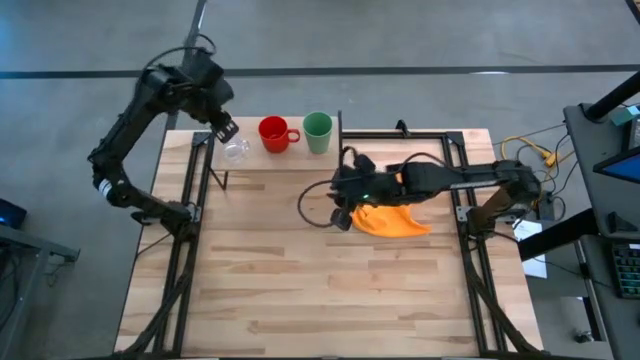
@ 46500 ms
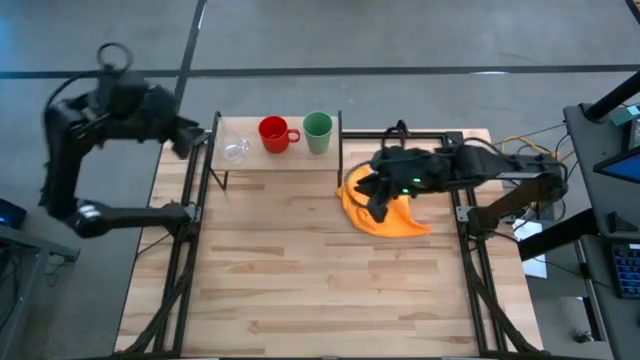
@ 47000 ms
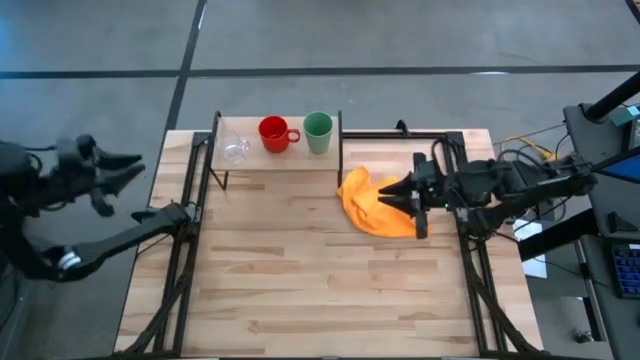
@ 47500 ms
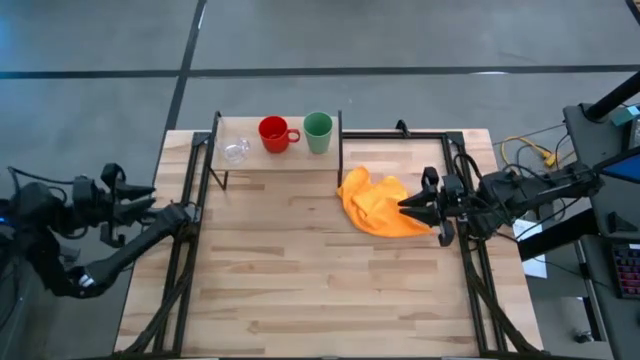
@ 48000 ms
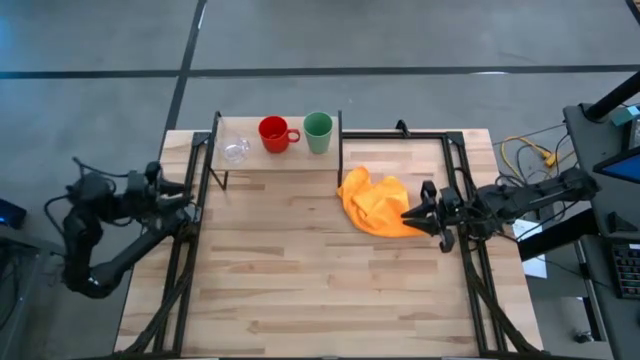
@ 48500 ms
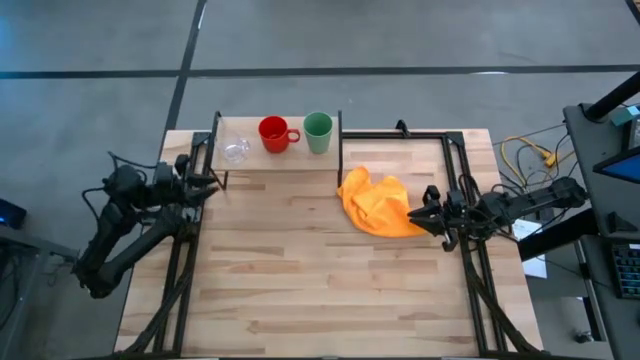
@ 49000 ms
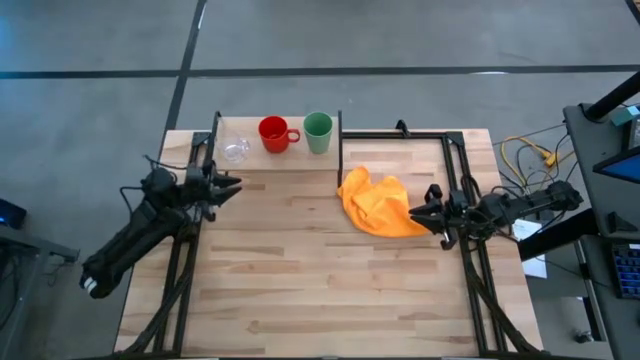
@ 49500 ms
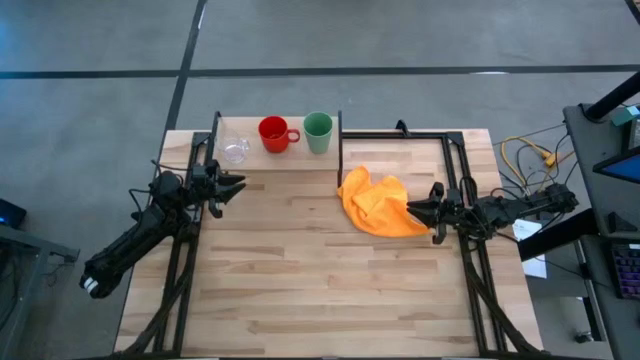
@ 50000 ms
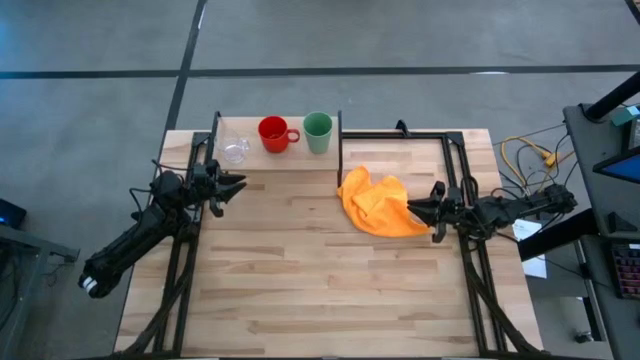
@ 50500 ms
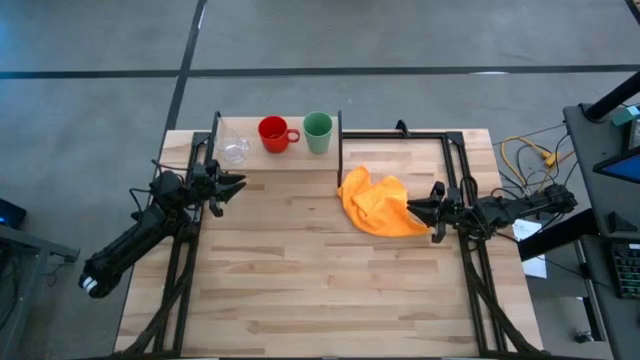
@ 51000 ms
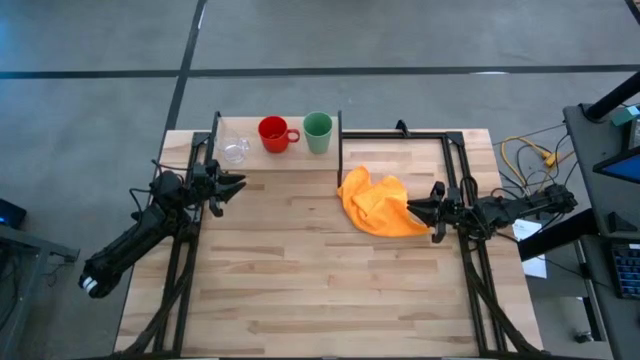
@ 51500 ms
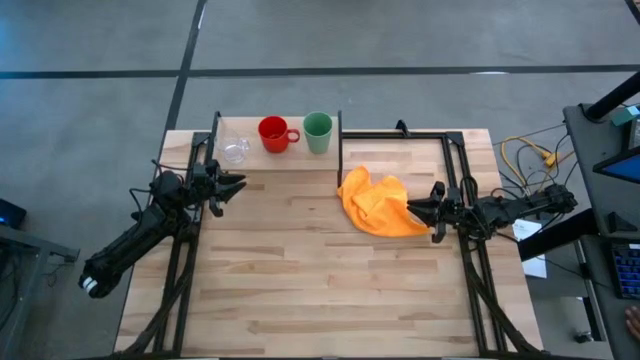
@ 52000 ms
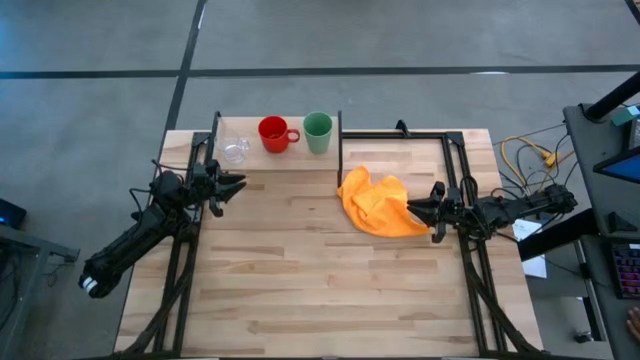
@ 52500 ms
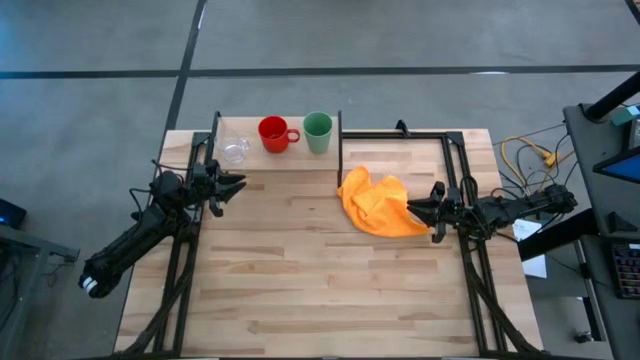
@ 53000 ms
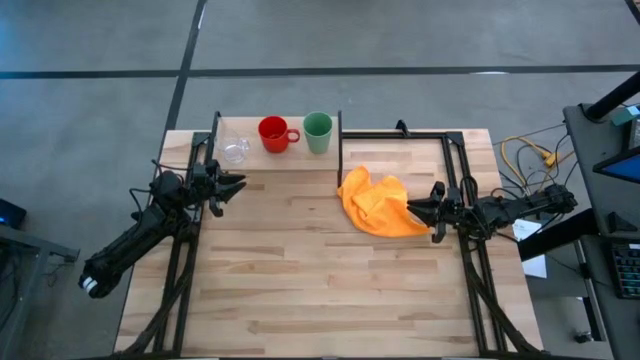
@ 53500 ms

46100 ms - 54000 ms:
Task: Stack small to large cups/mugs on shelf
Return to Home Position

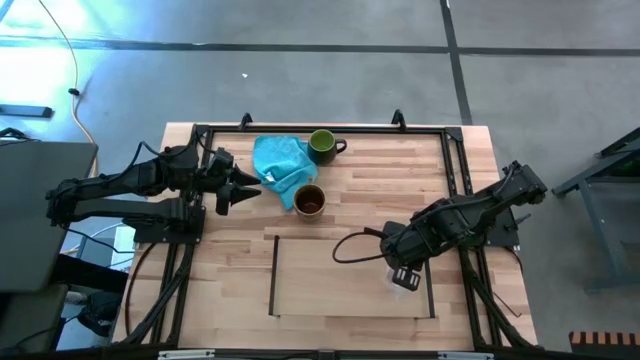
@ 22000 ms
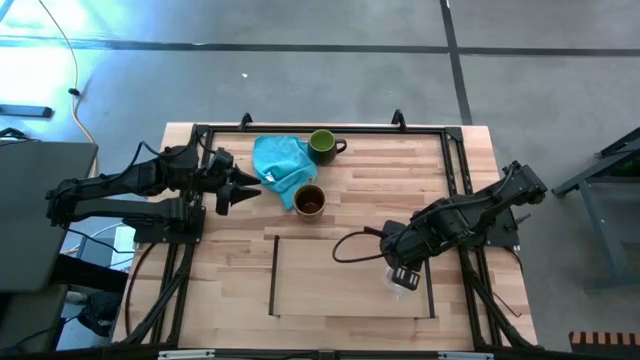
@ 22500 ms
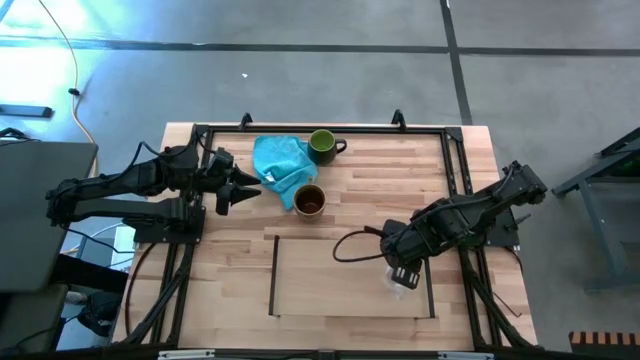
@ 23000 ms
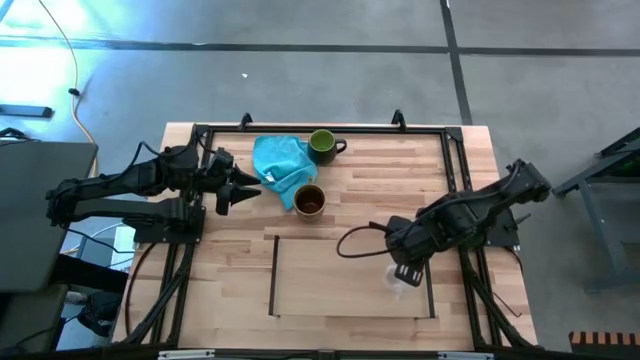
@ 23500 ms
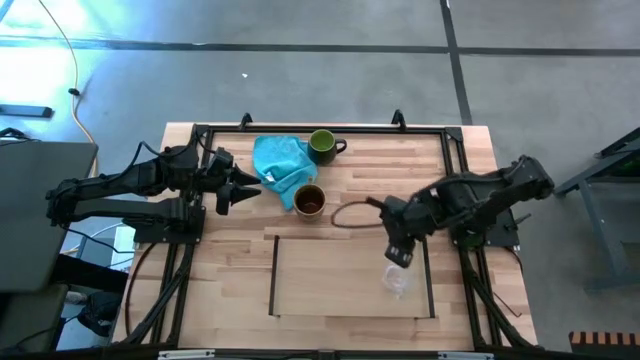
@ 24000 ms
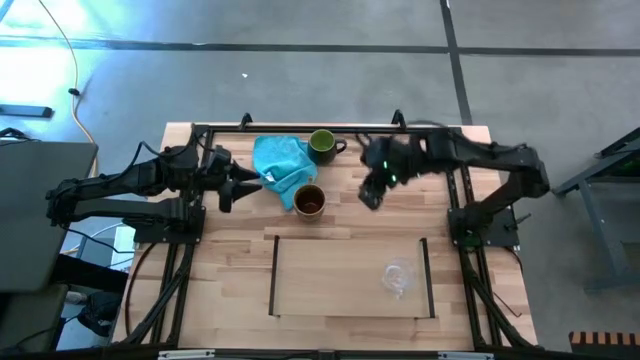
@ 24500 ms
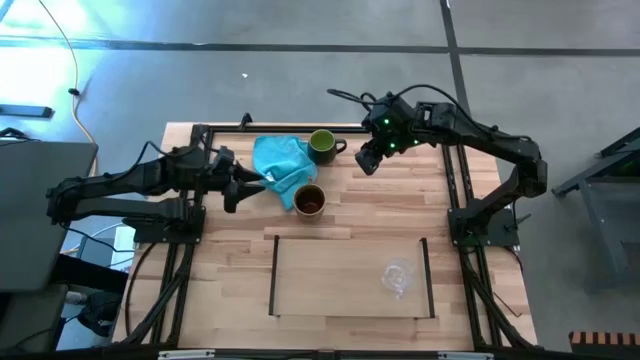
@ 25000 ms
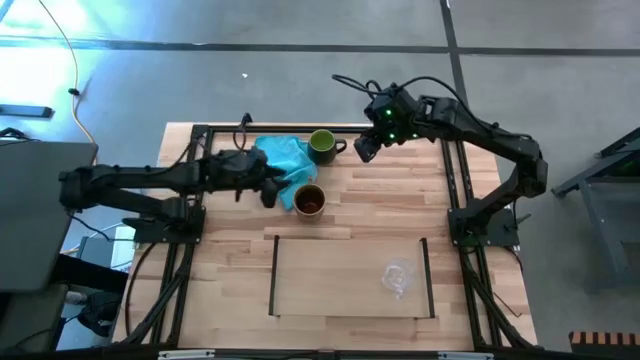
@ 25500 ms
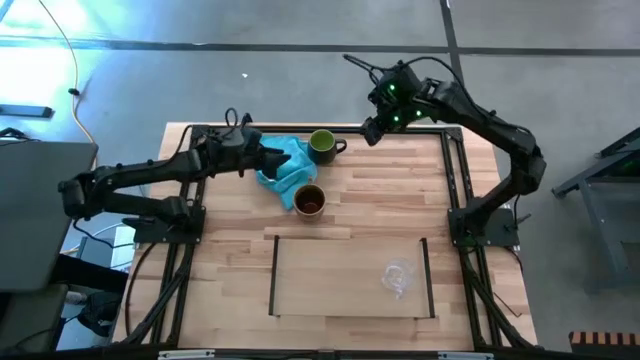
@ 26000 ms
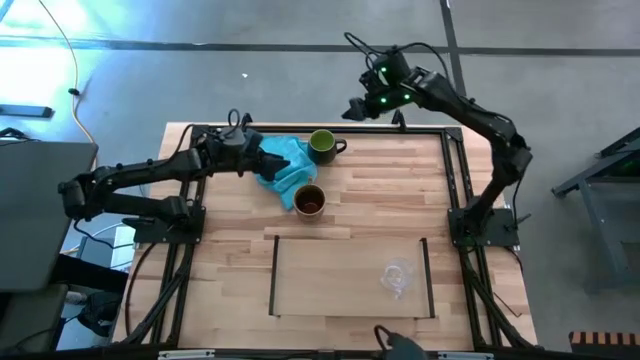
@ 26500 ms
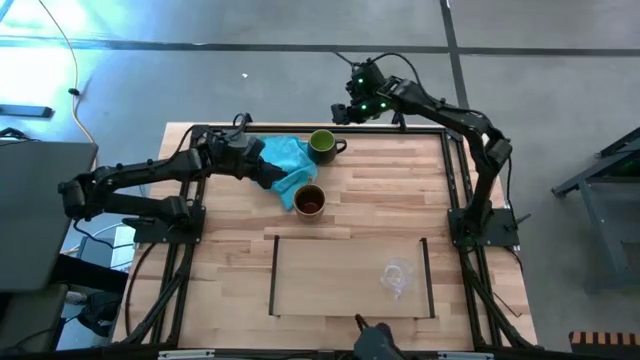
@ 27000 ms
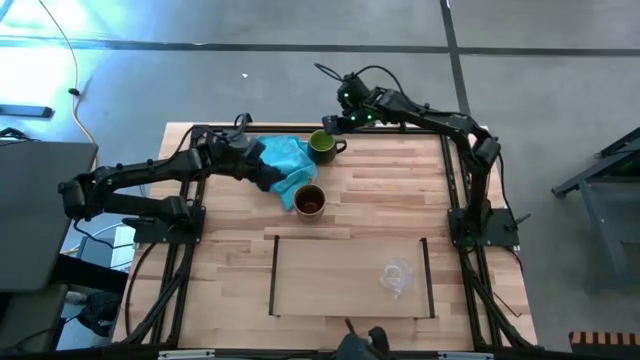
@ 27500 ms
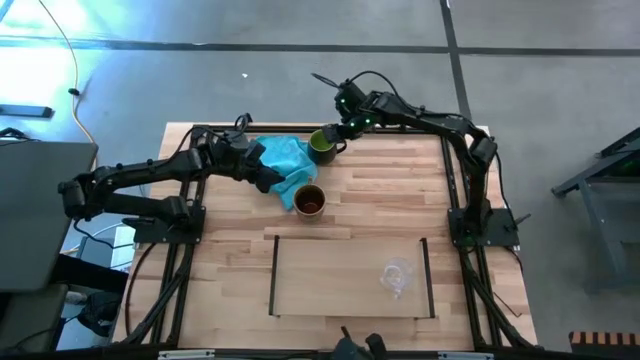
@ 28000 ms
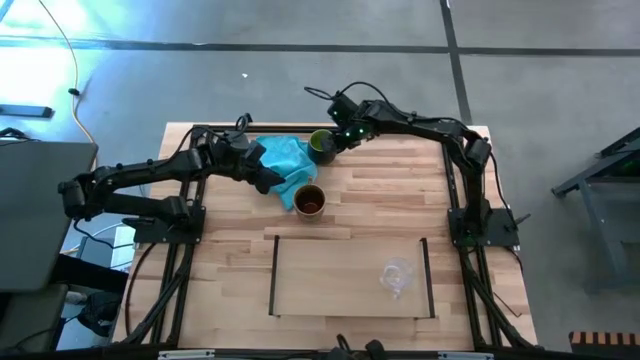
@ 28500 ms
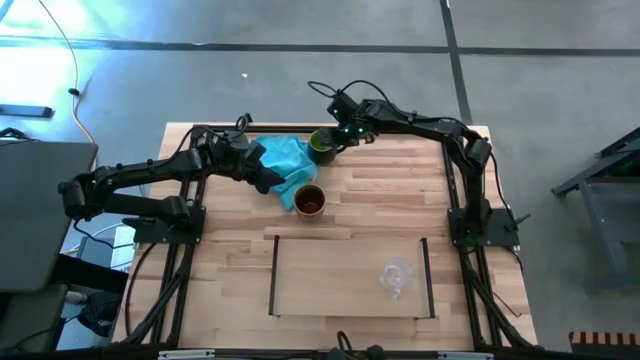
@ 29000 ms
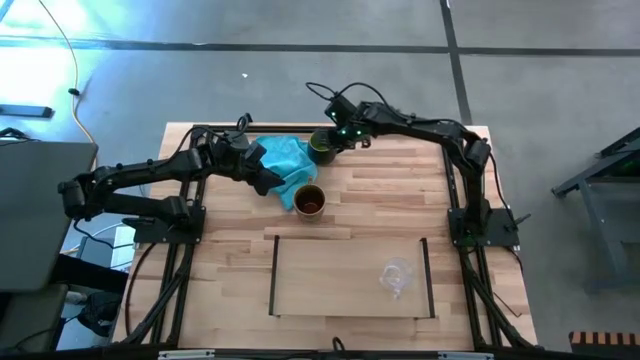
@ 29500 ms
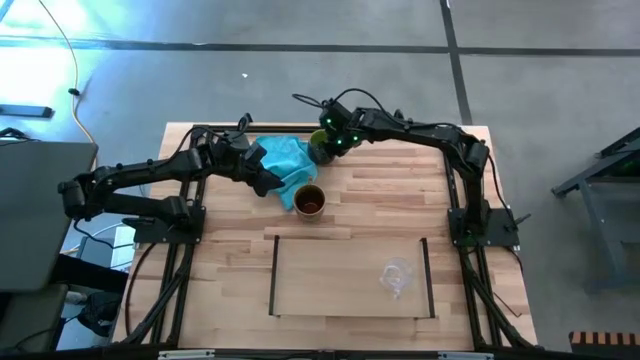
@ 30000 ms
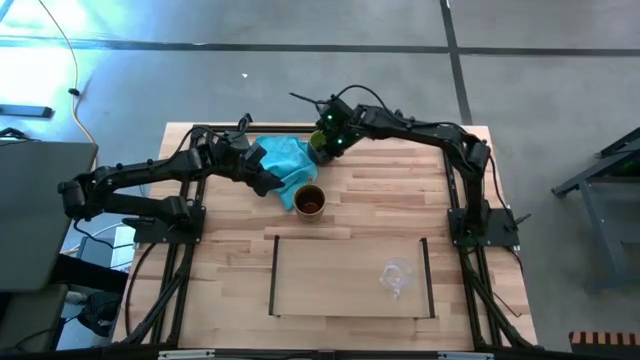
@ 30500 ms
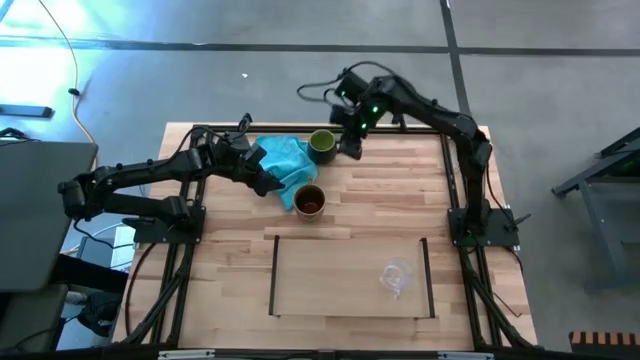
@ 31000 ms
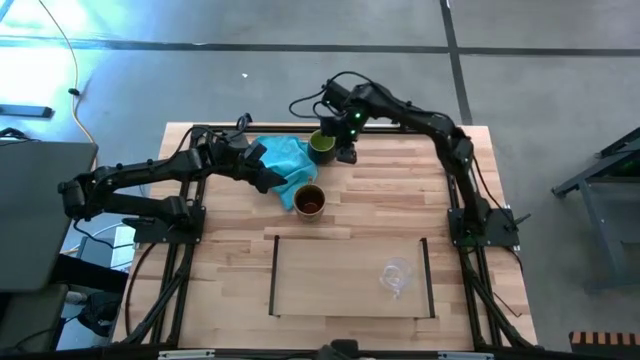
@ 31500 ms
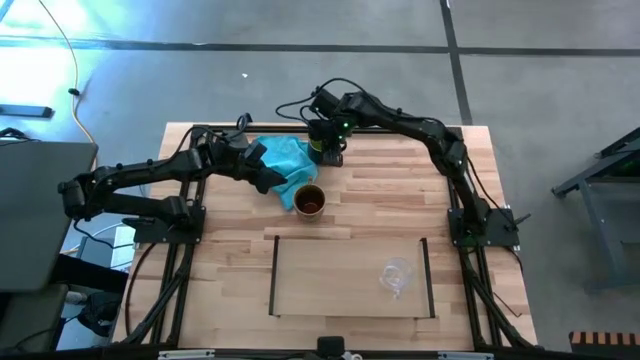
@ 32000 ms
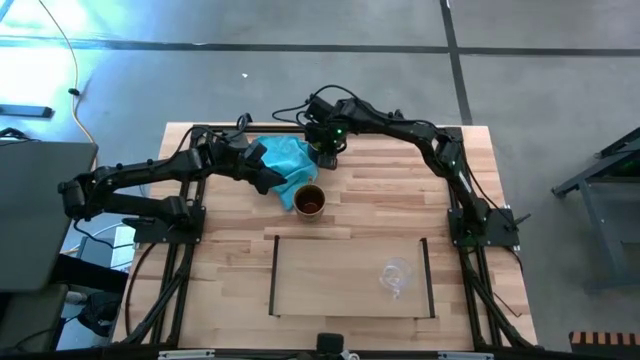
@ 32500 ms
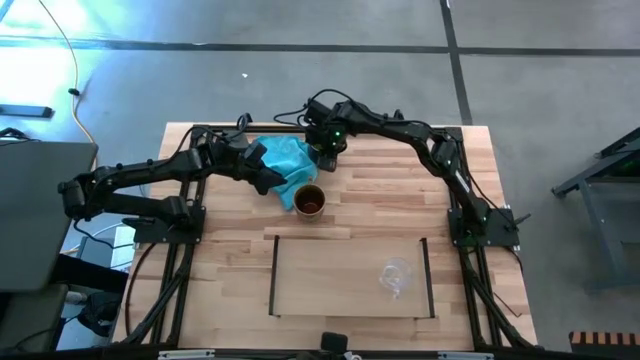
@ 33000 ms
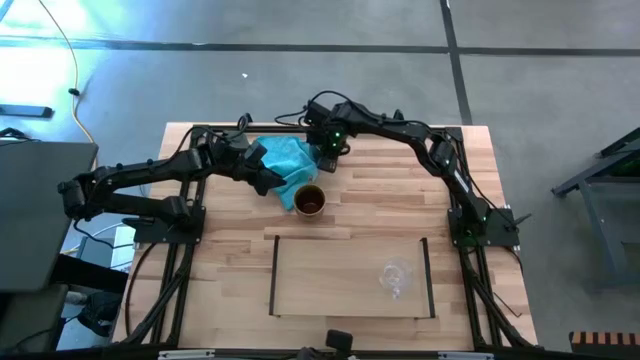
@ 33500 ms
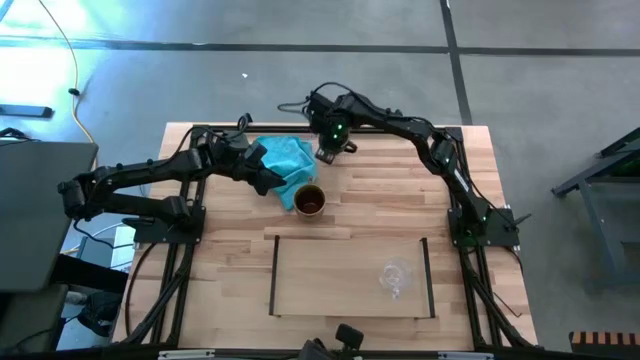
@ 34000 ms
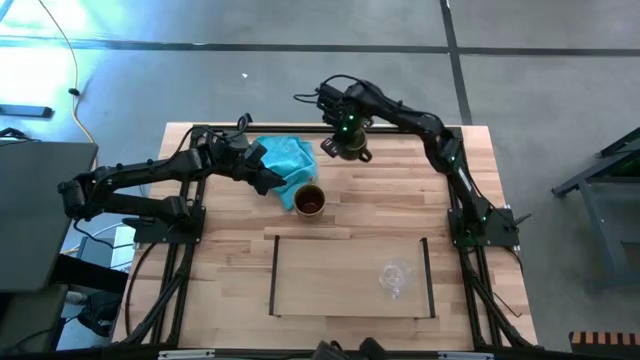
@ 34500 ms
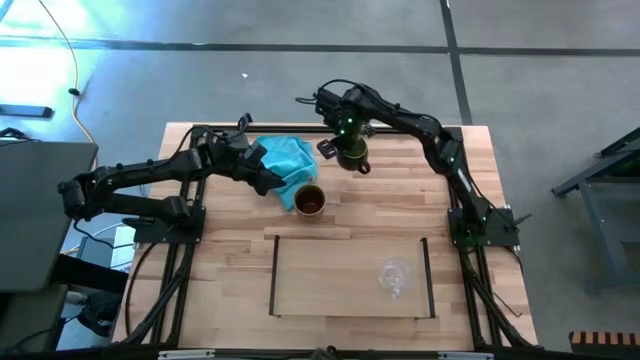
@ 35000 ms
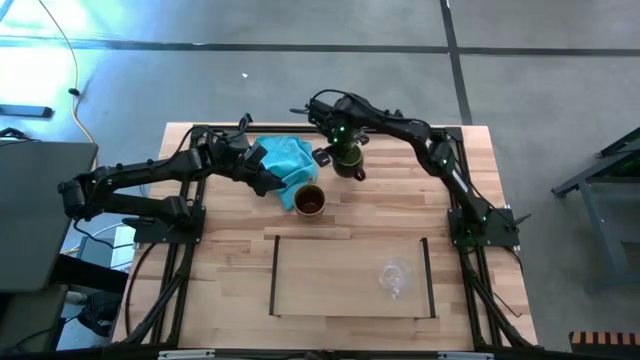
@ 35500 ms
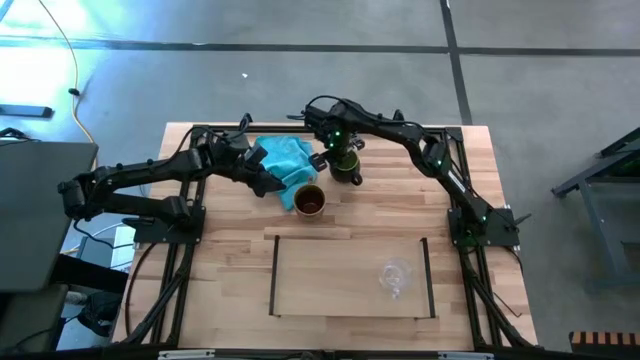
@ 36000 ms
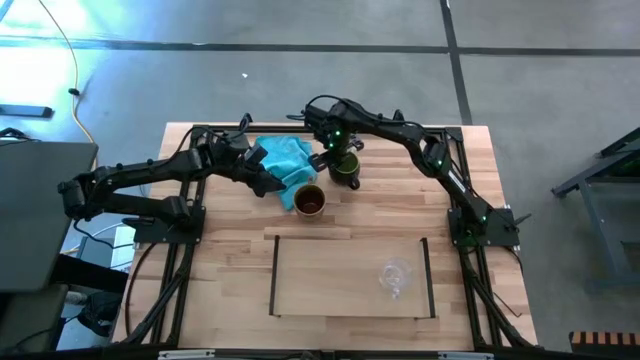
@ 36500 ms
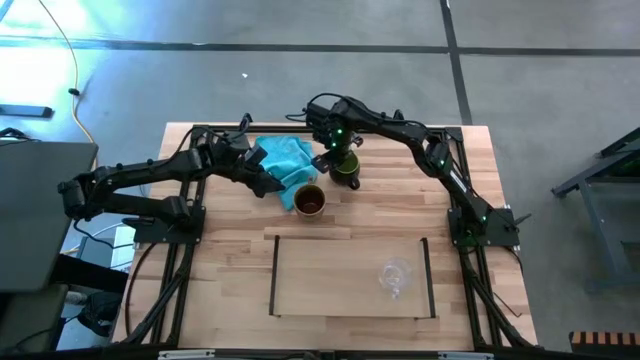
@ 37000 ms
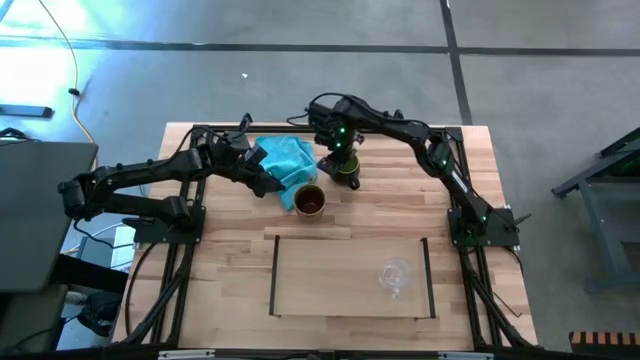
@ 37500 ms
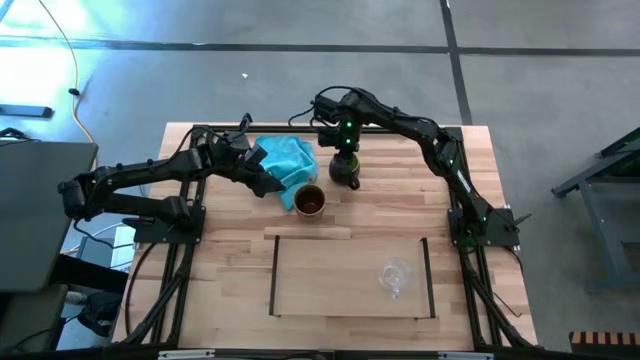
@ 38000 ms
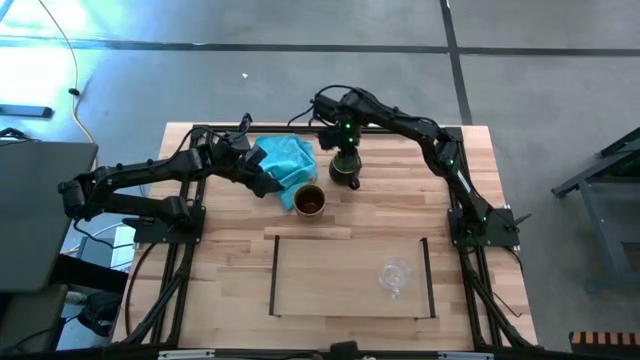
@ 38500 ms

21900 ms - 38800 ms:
Task: Stack small to large cups/mugs on shelf
Put the black mug on the shelf
